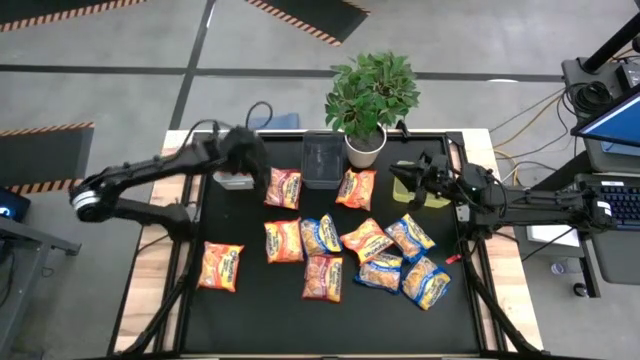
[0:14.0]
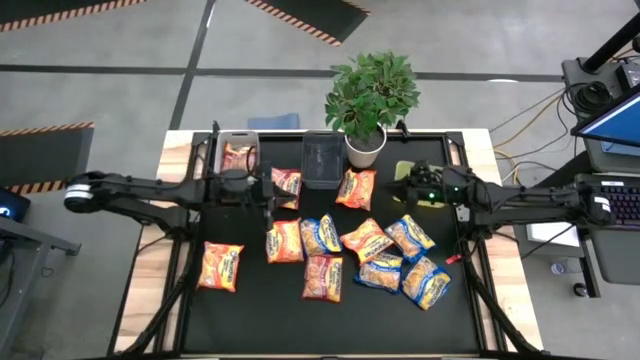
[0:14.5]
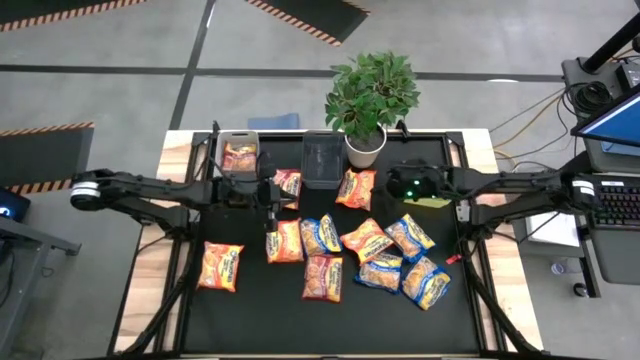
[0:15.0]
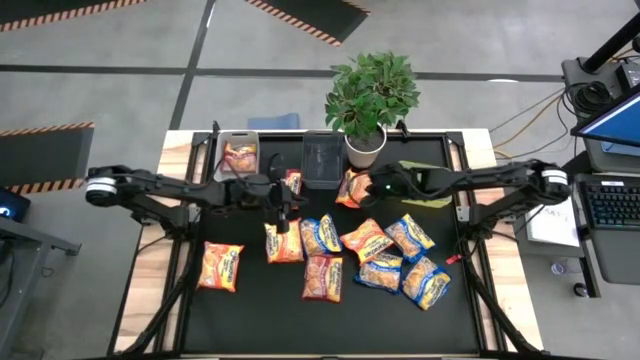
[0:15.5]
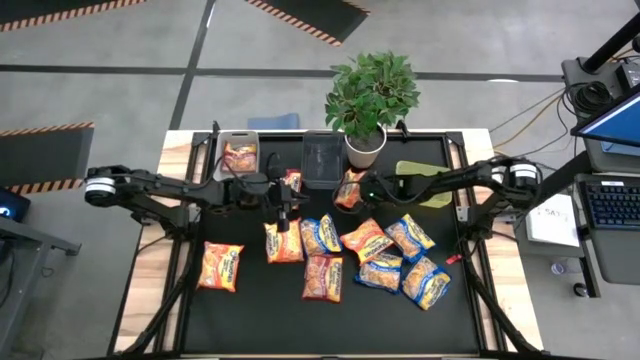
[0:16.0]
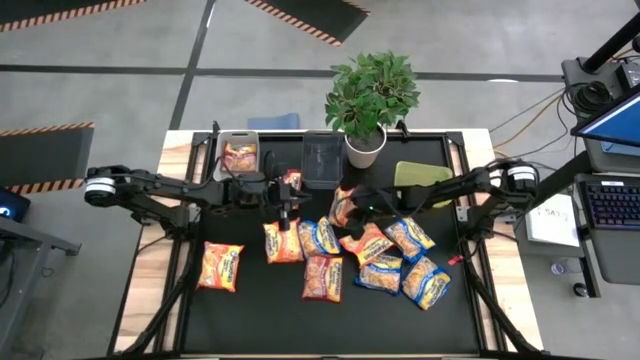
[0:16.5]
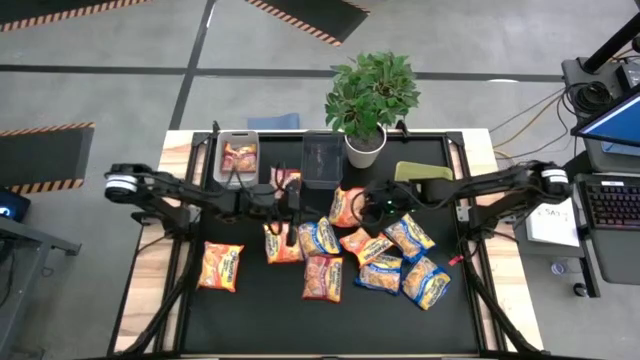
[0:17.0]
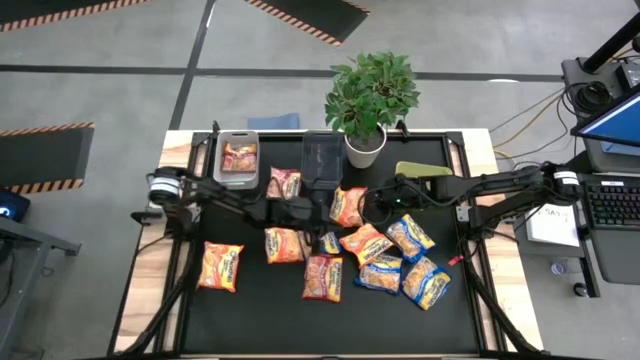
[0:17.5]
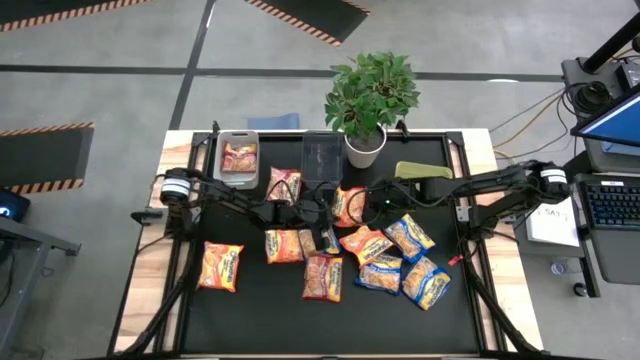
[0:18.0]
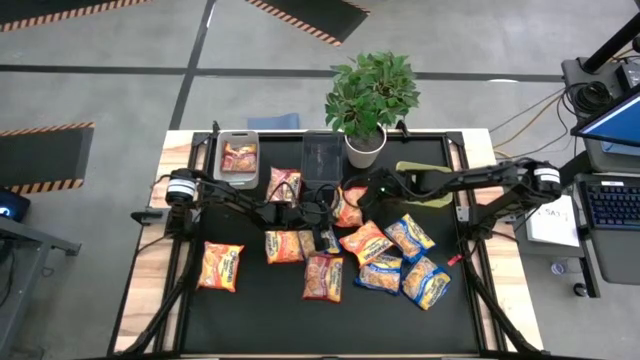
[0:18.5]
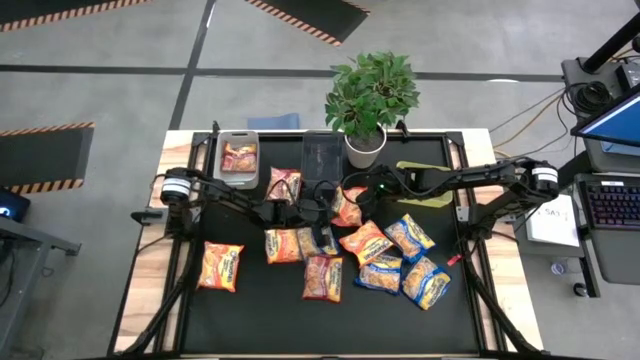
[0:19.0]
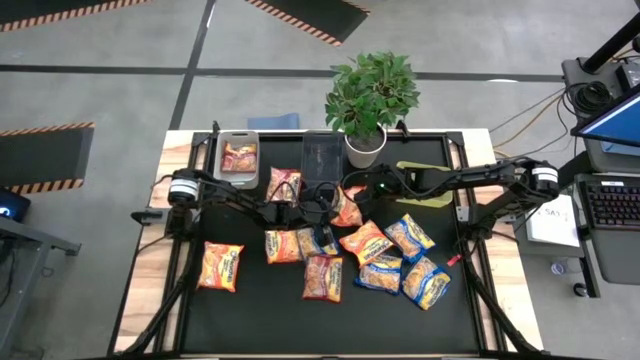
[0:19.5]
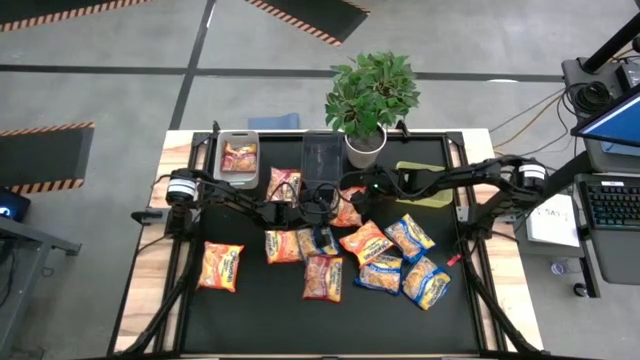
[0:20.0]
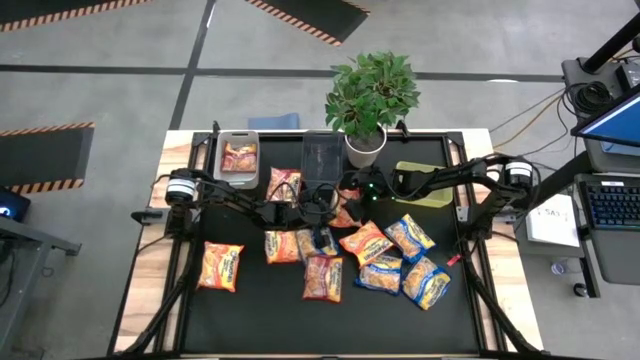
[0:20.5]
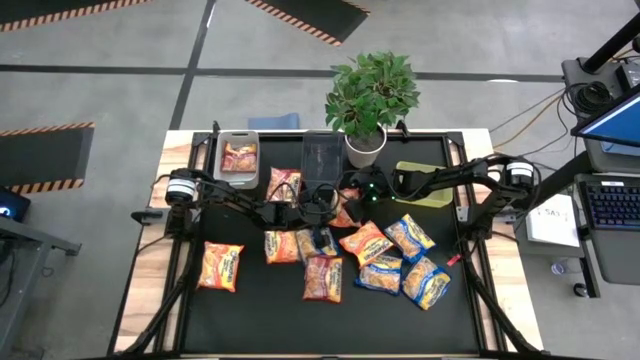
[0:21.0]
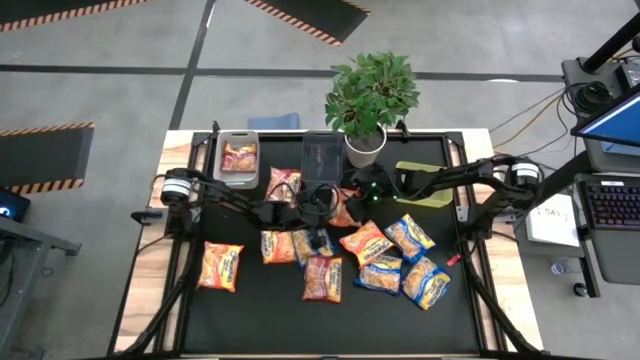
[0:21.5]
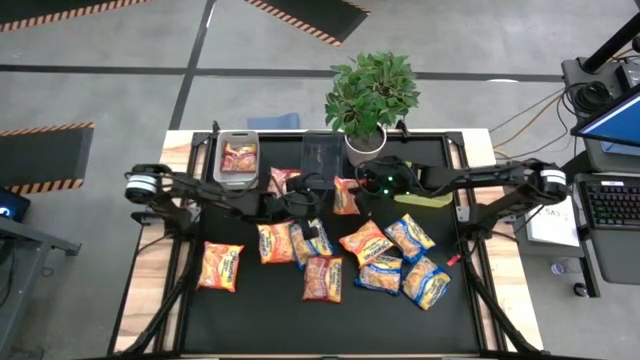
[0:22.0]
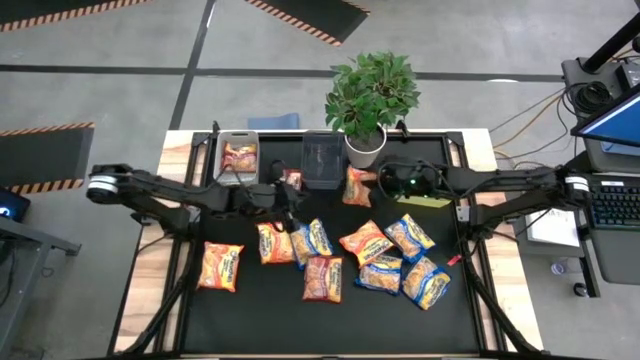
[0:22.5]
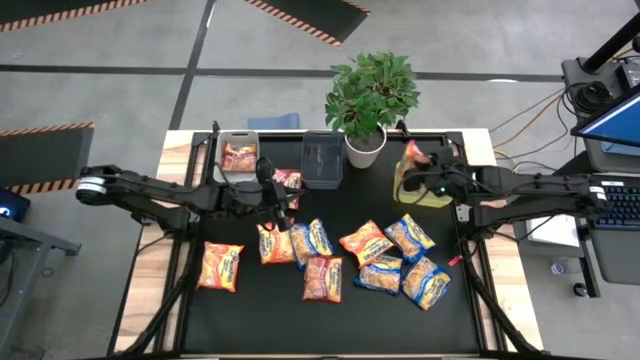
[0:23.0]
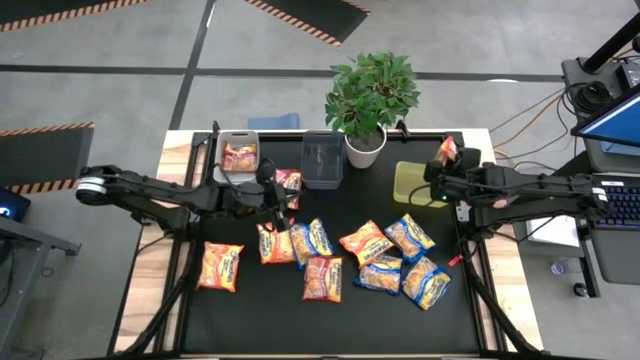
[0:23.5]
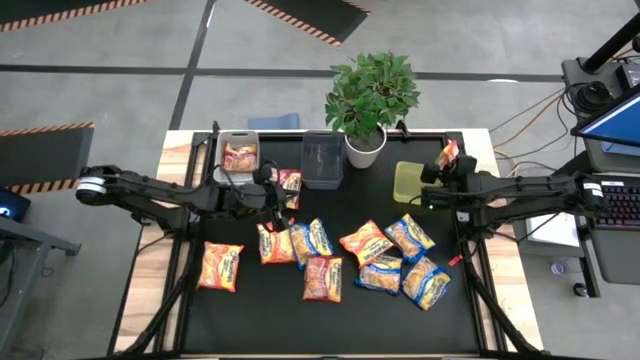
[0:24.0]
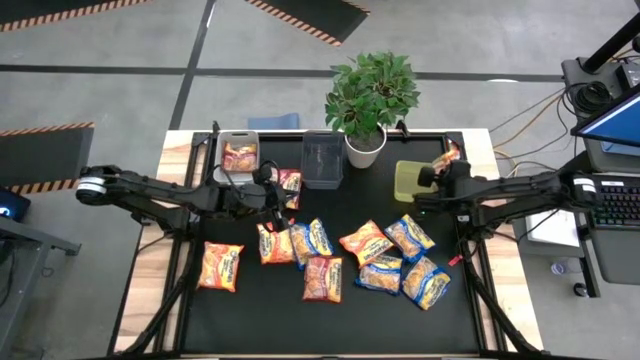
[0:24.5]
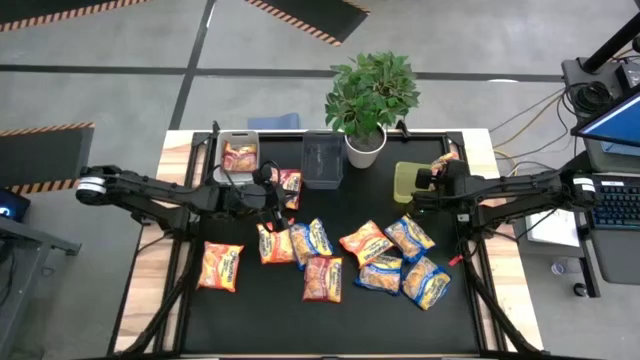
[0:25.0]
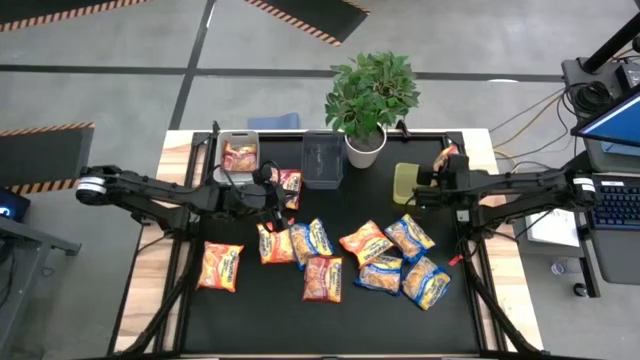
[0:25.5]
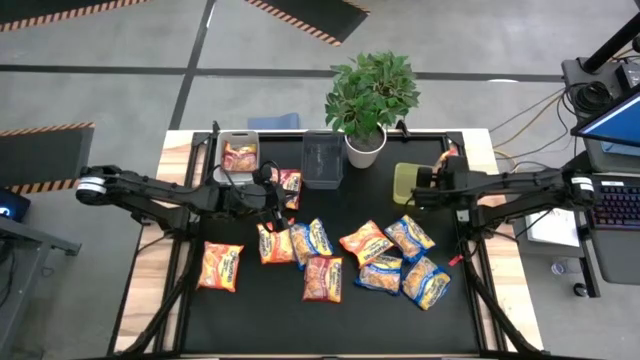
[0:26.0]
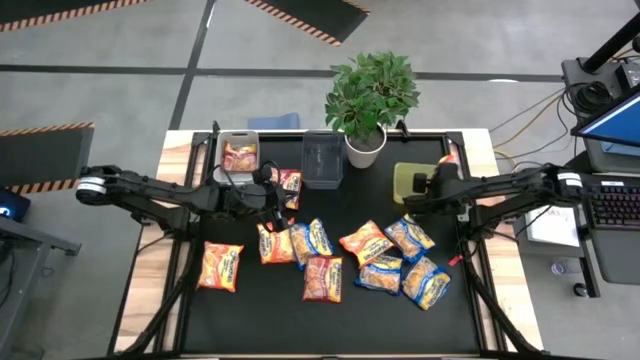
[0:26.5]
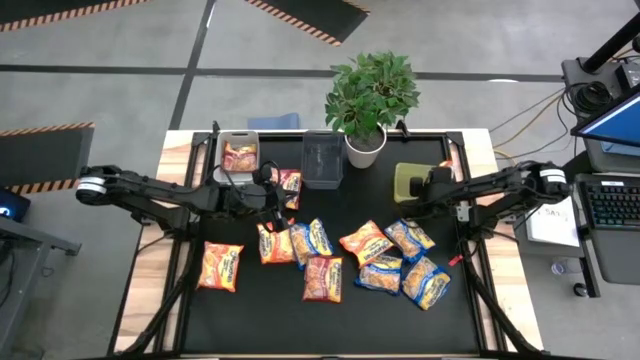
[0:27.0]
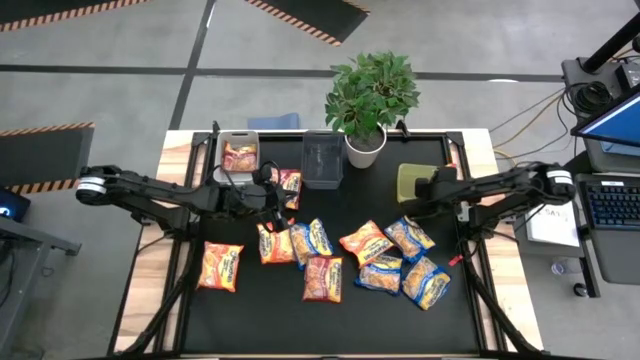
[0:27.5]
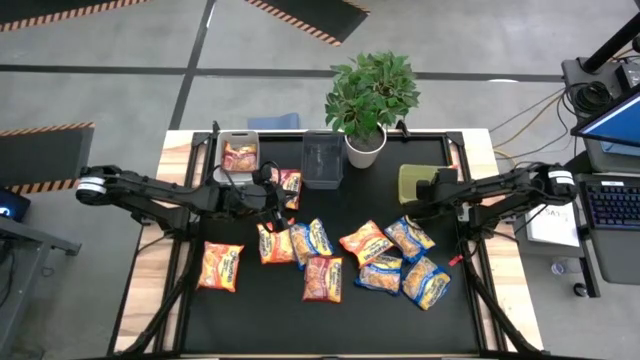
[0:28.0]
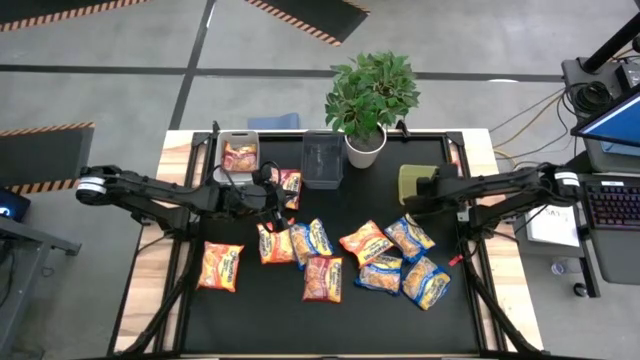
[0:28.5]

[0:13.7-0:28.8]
Task: Sort Maruchan noodles
Put the orange noodle pack into the yellow bin

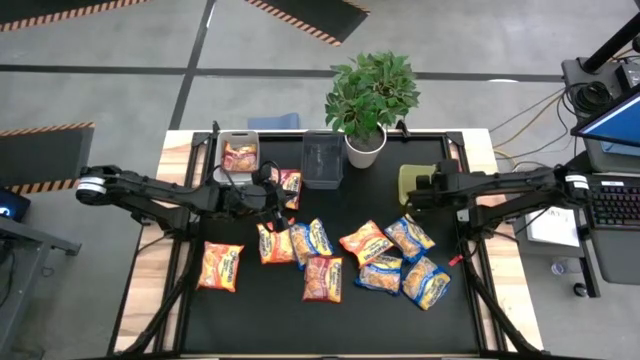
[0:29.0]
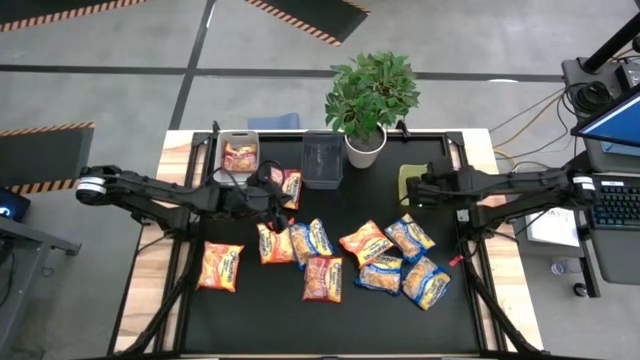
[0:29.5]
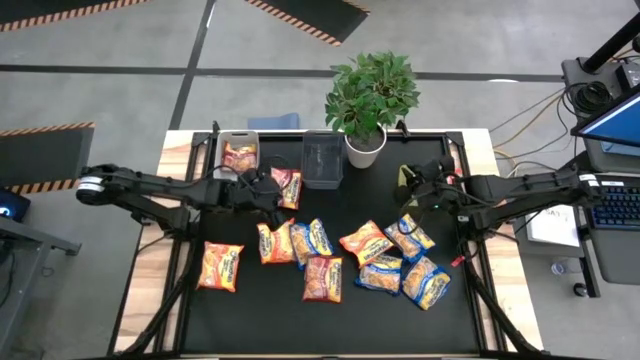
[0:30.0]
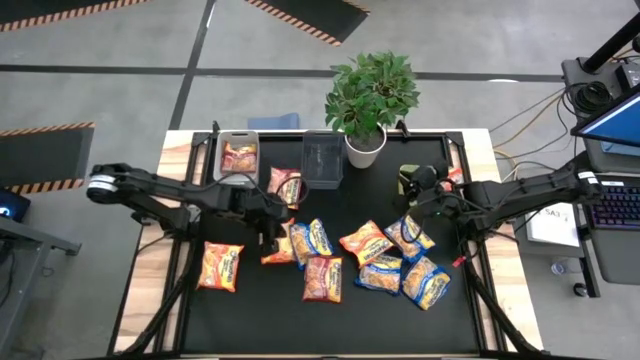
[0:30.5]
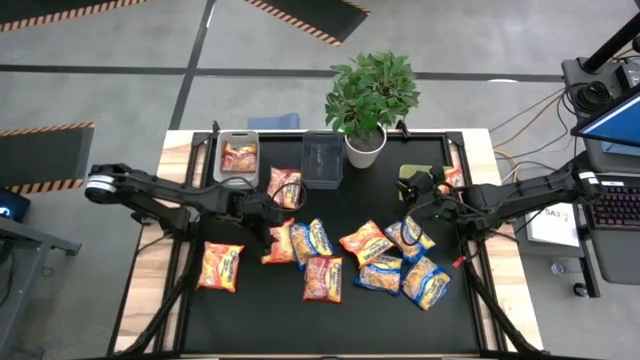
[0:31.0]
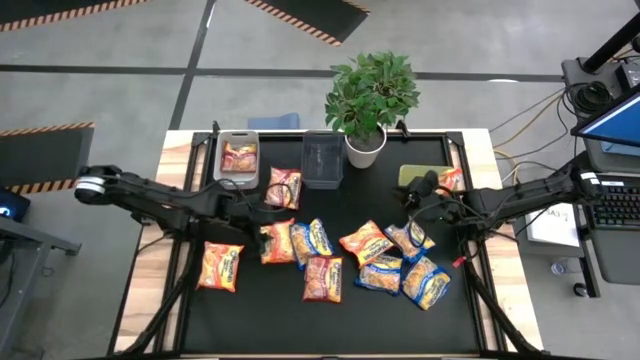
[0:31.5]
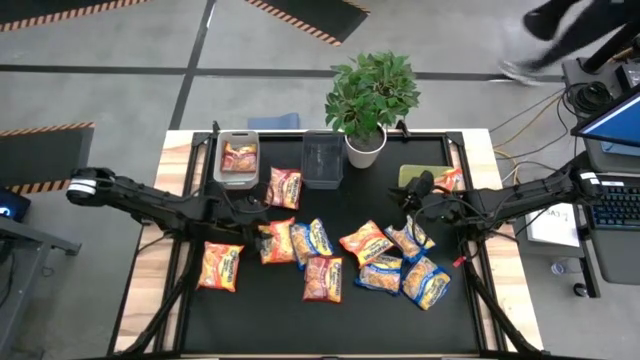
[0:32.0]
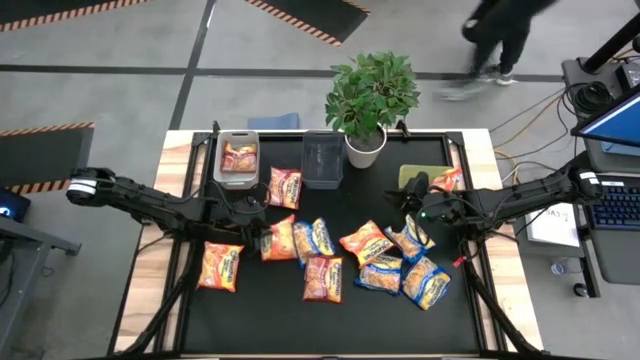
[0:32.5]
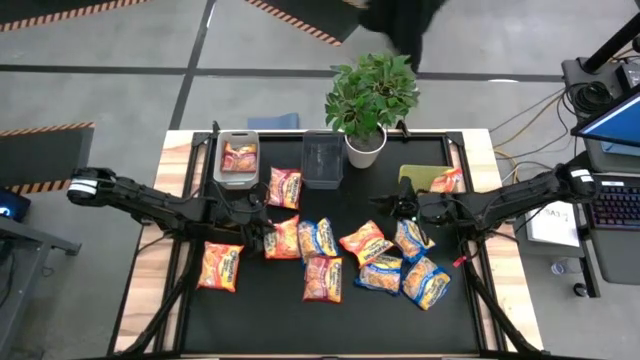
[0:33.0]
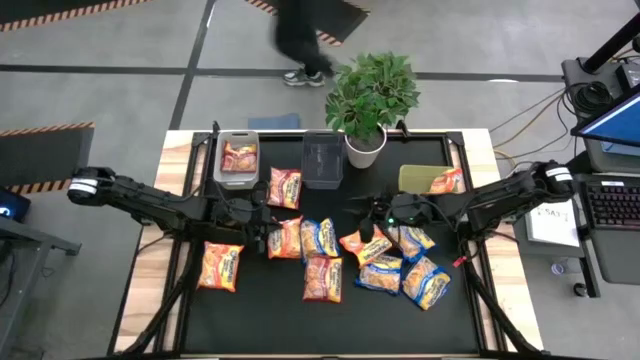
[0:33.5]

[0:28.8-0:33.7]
Put the orange noodle pack into the yellow bin
